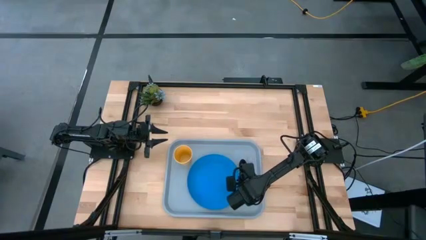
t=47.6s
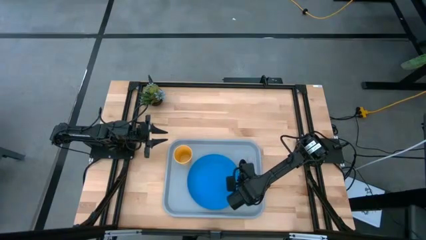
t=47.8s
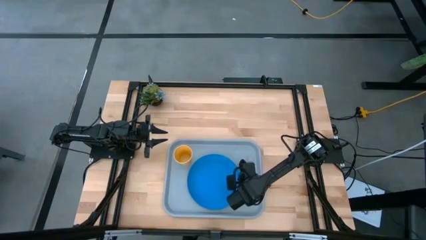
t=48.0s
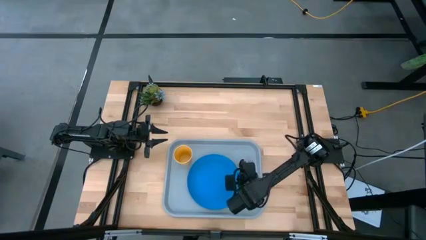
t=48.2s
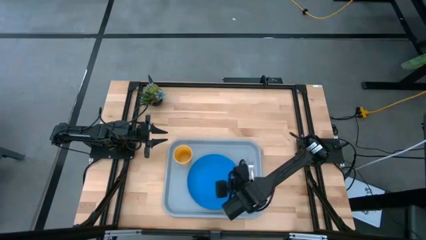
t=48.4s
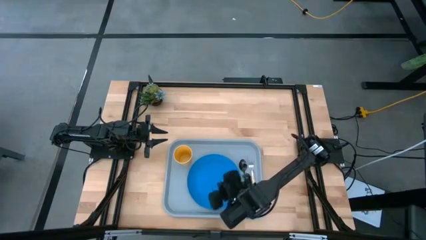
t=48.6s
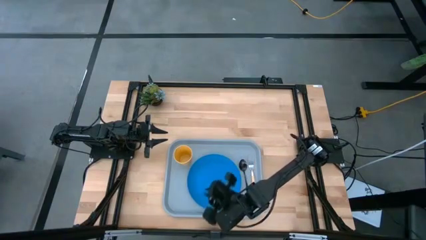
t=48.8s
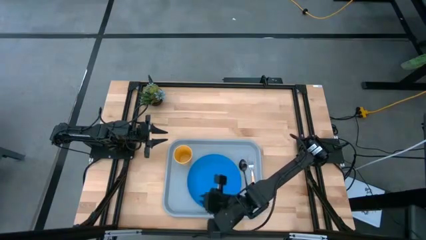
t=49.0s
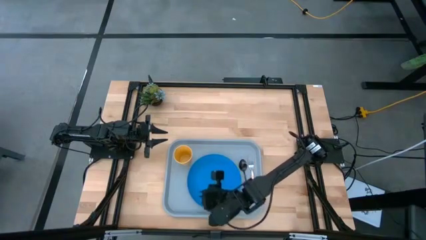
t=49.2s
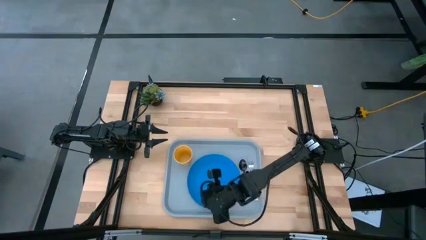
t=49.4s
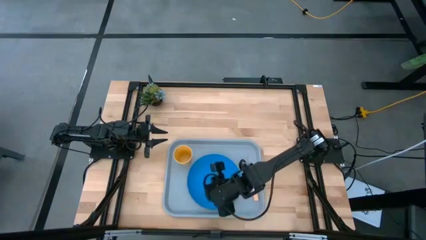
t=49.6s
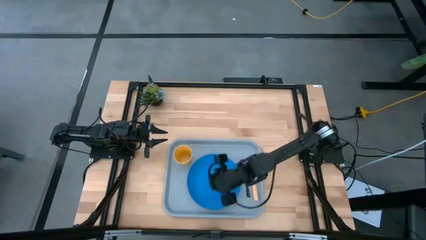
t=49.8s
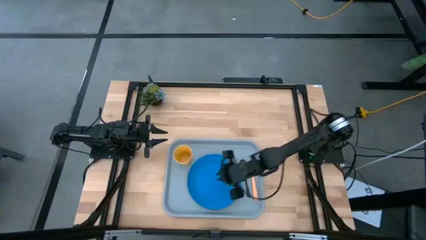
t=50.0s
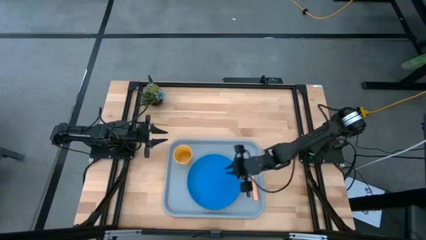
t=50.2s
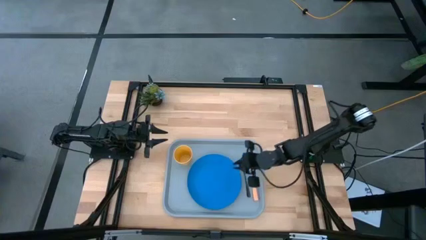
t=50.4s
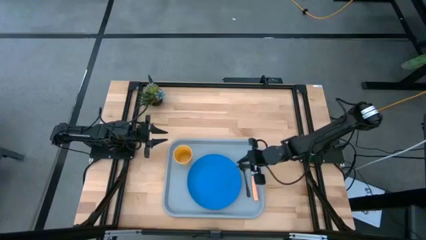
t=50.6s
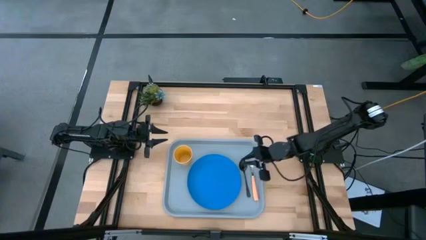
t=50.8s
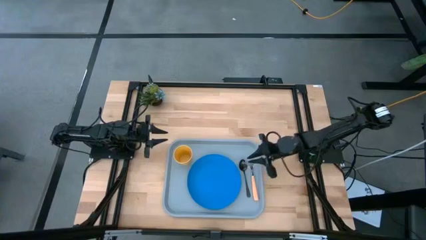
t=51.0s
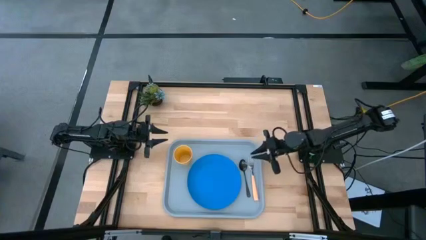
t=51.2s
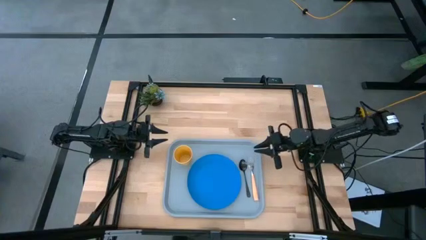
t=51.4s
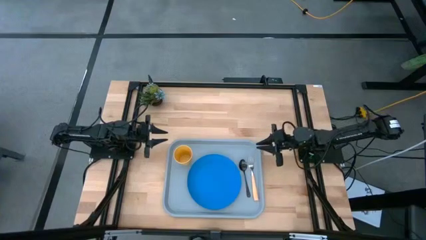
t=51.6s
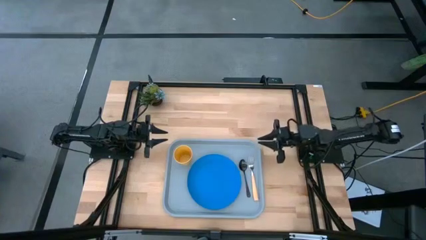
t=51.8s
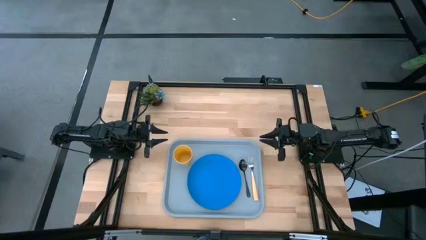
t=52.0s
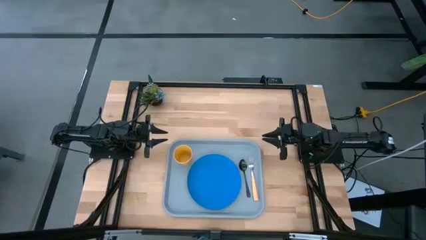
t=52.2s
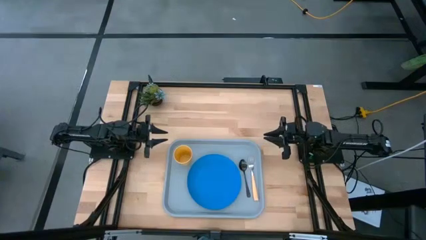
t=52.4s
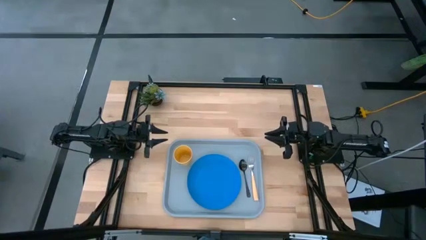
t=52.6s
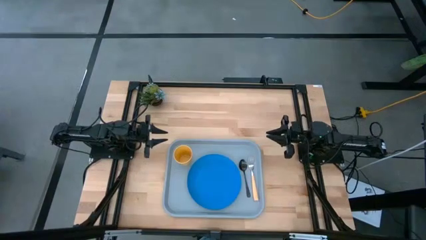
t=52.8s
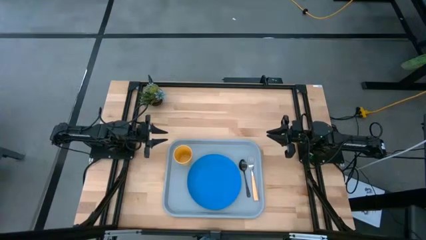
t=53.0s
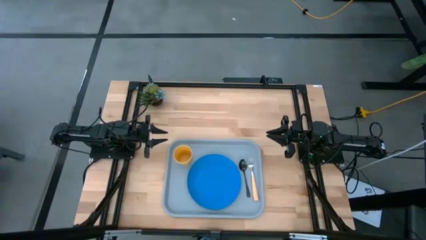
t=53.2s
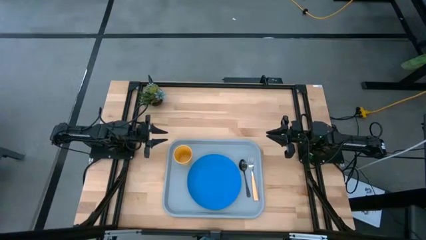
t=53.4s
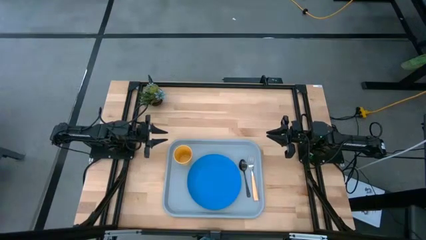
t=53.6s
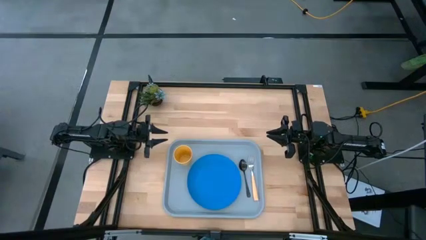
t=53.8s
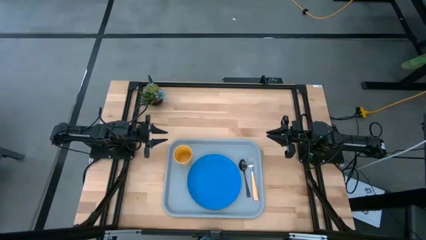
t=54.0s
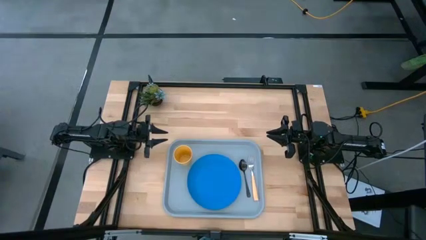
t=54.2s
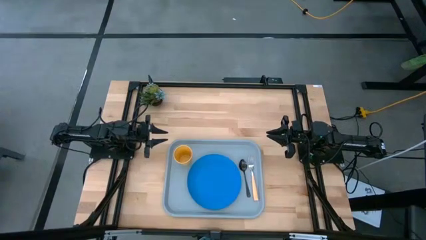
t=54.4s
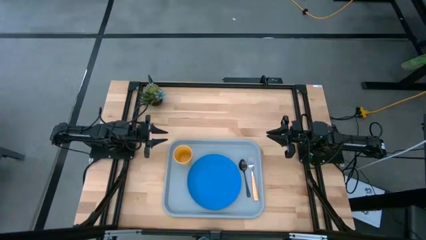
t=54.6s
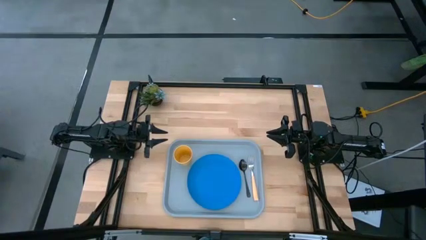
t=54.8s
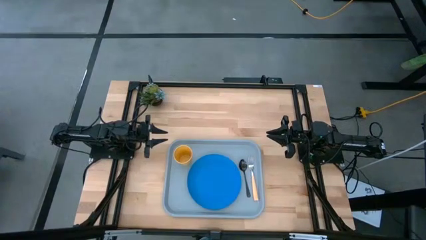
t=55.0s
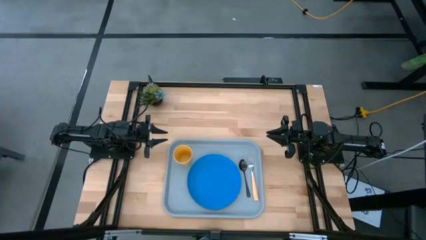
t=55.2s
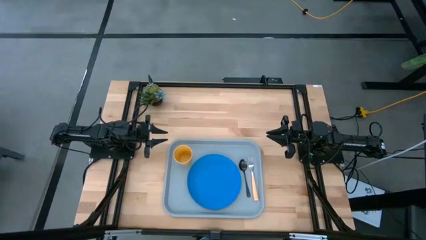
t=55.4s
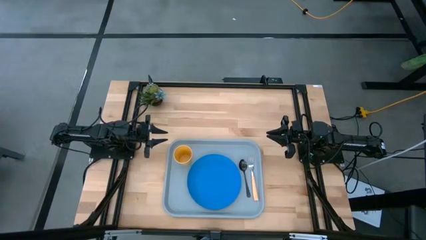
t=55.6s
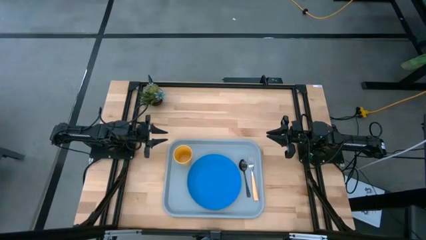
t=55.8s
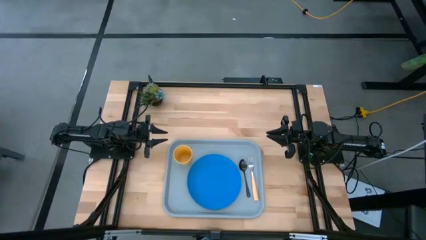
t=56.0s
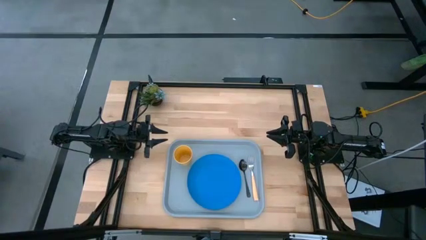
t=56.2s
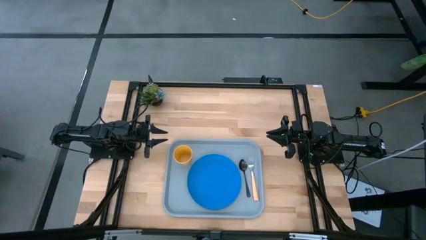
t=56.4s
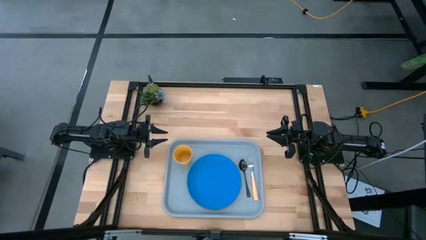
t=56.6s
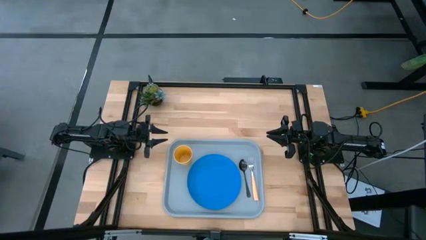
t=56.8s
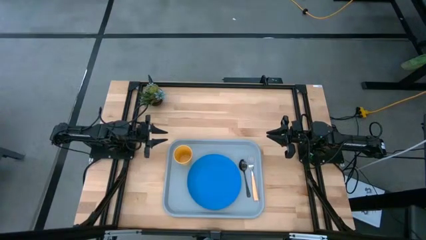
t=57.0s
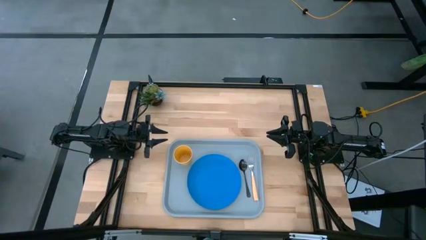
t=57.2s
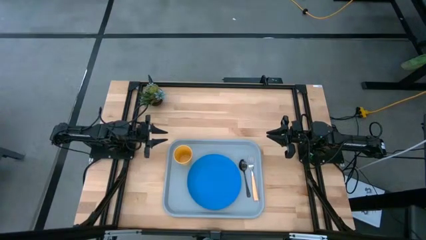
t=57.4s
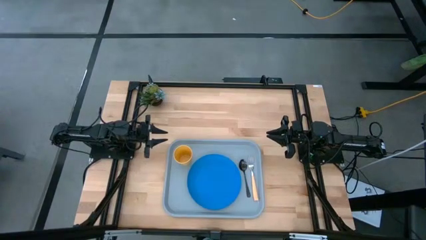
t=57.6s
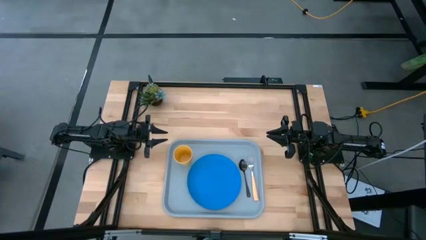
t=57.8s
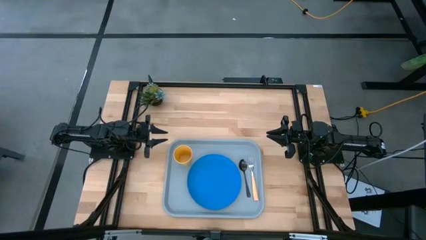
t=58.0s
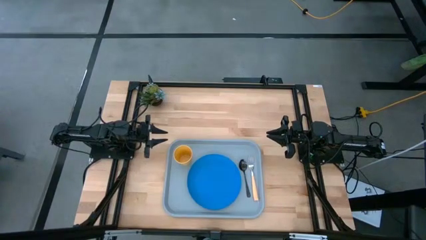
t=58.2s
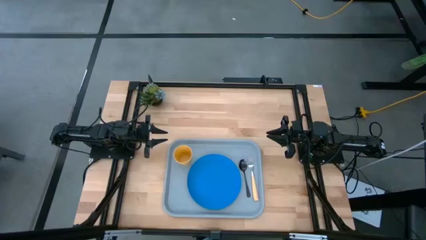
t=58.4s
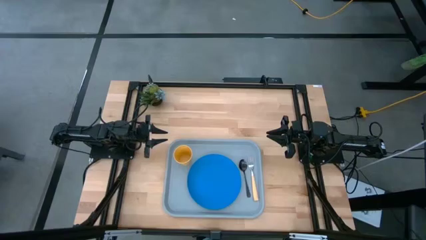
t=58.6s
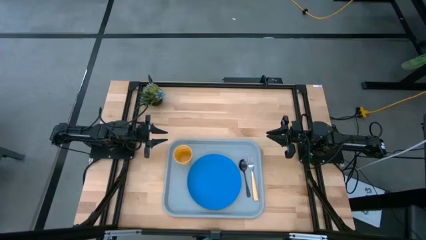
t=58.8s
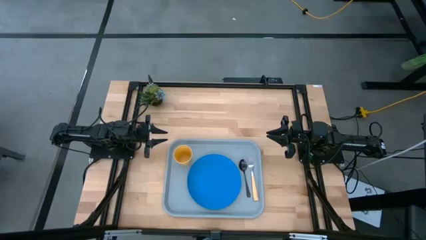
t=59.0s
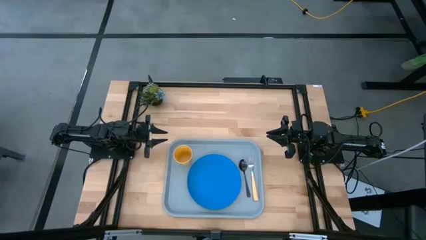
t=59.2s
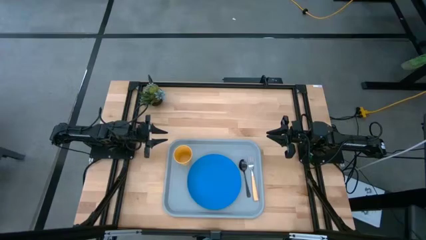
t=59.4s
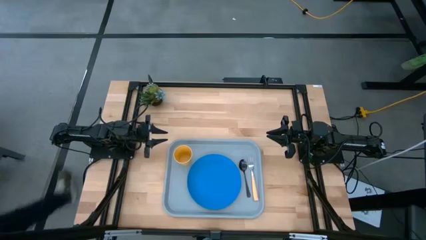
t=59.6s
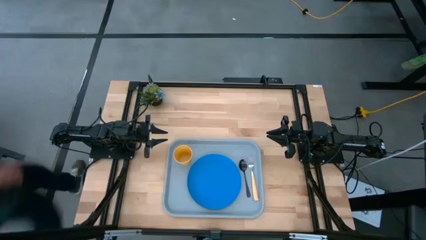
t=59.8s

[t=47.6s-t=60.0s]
Task: Pick and place plate/cup/fork/spoon on tray
Return to Home Position
